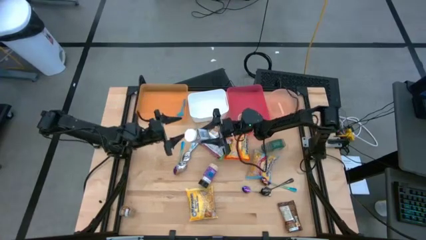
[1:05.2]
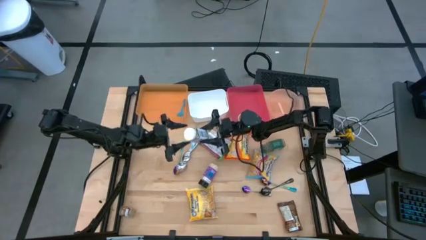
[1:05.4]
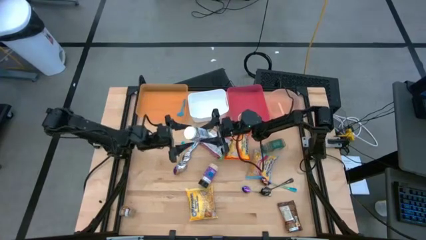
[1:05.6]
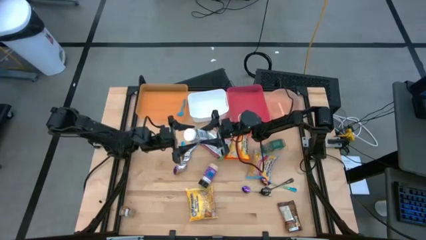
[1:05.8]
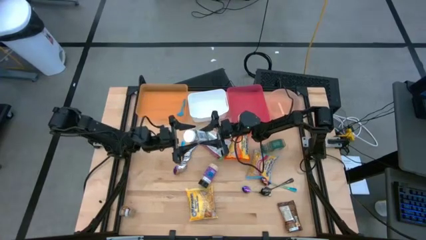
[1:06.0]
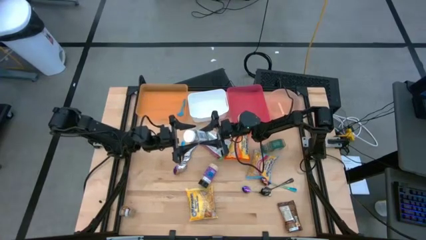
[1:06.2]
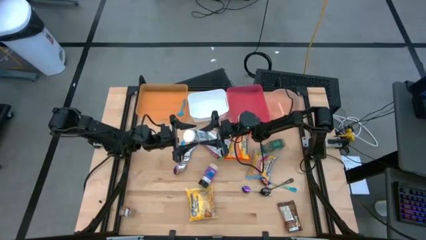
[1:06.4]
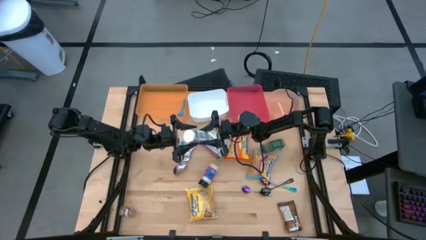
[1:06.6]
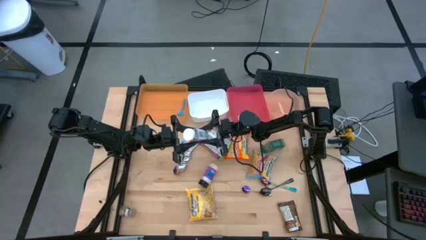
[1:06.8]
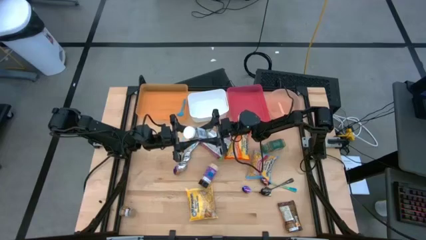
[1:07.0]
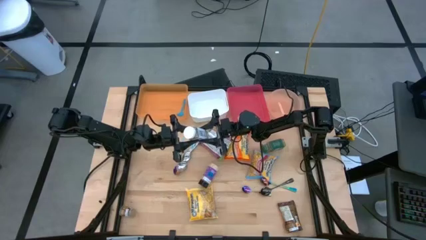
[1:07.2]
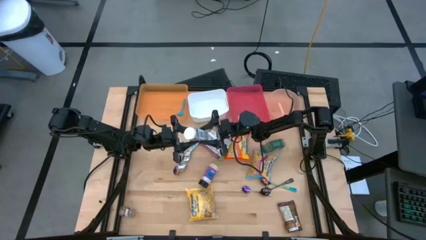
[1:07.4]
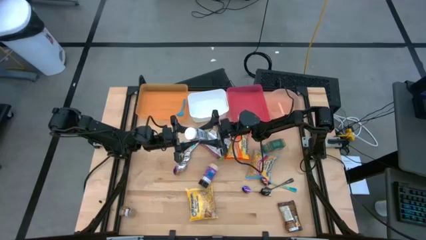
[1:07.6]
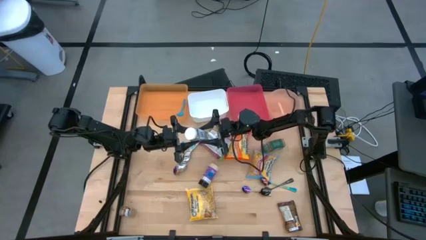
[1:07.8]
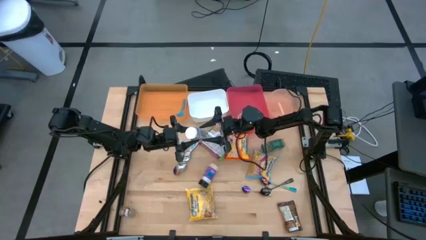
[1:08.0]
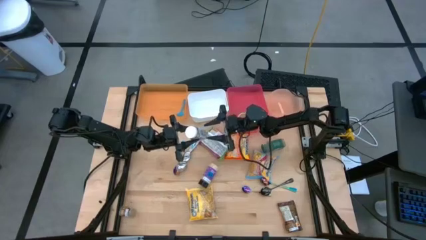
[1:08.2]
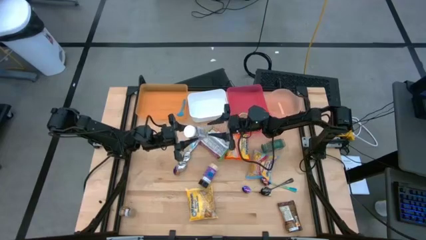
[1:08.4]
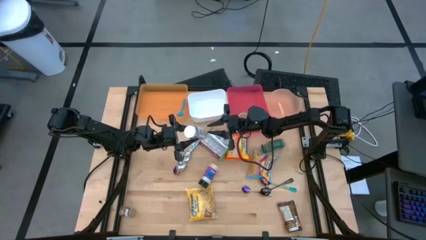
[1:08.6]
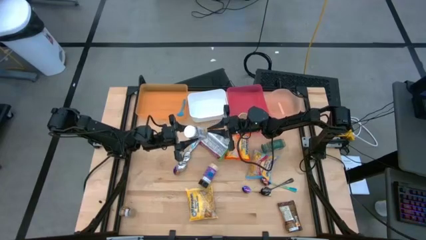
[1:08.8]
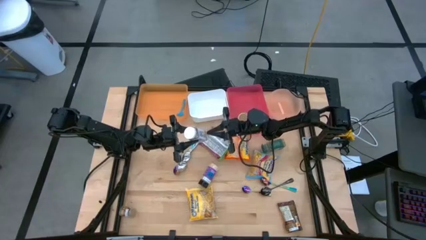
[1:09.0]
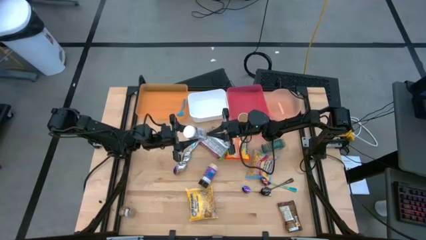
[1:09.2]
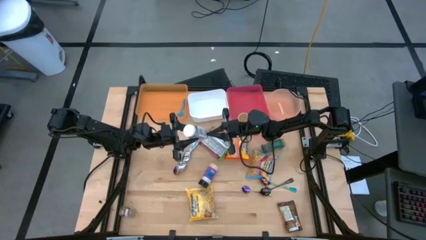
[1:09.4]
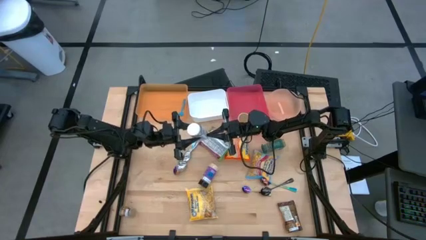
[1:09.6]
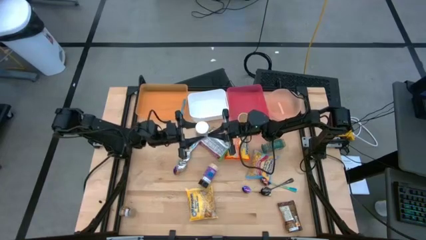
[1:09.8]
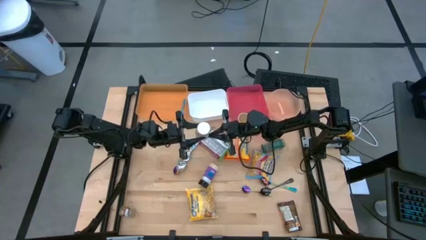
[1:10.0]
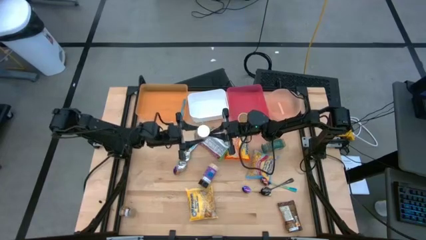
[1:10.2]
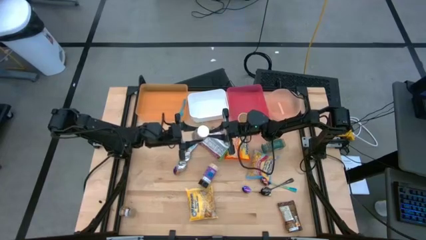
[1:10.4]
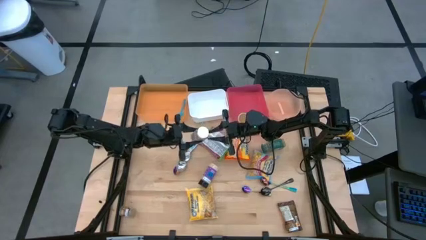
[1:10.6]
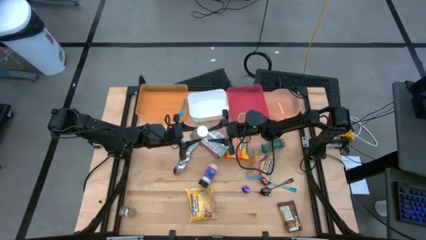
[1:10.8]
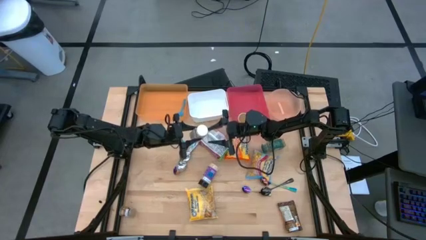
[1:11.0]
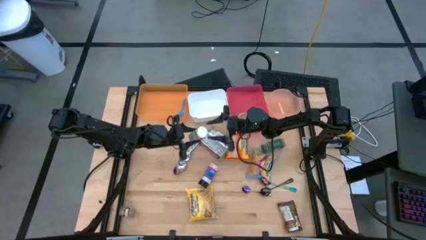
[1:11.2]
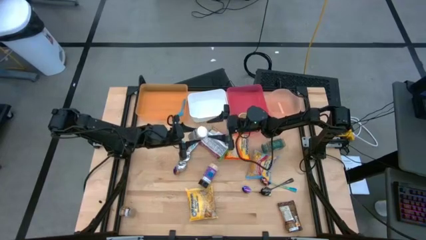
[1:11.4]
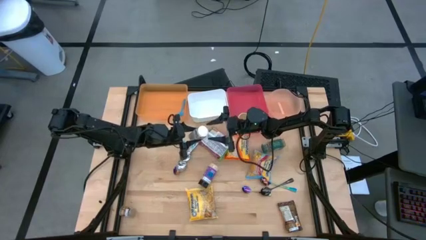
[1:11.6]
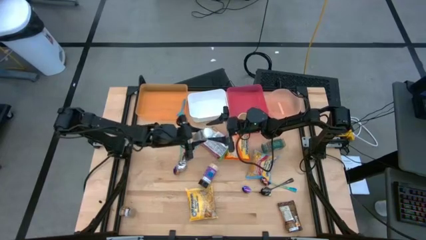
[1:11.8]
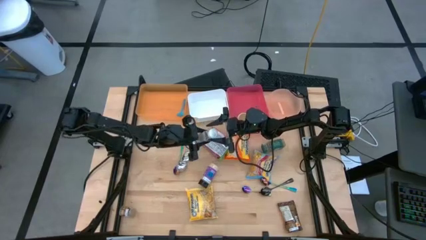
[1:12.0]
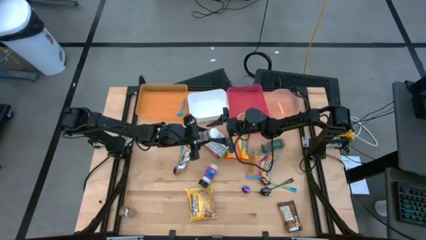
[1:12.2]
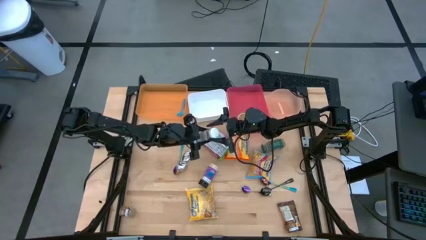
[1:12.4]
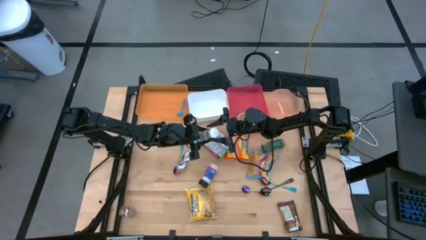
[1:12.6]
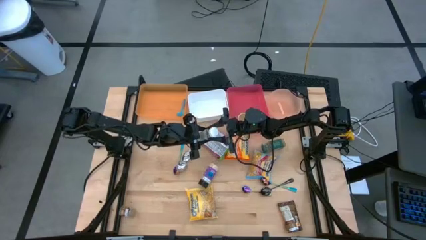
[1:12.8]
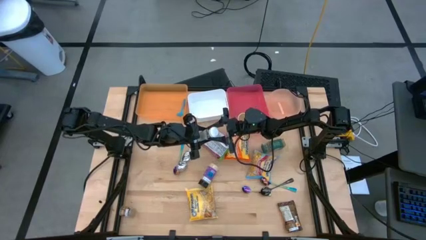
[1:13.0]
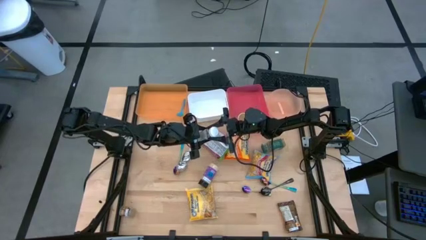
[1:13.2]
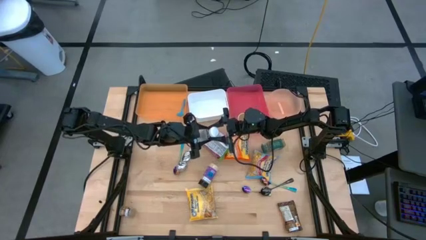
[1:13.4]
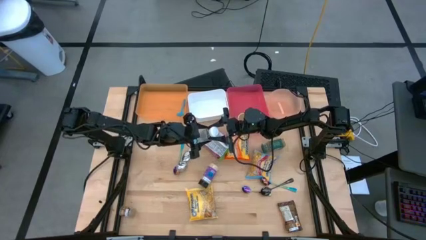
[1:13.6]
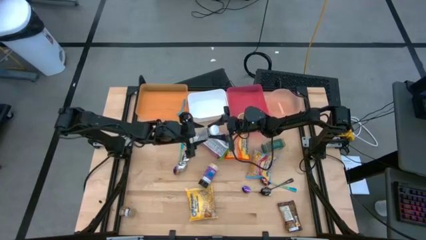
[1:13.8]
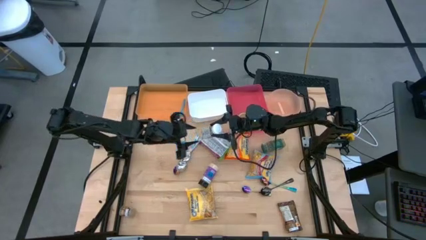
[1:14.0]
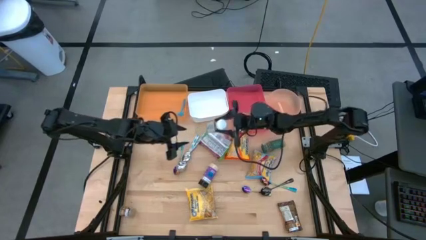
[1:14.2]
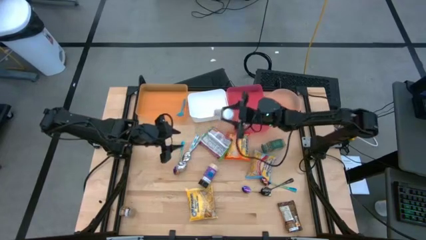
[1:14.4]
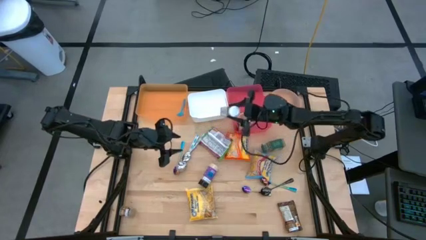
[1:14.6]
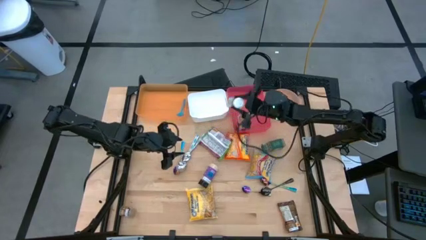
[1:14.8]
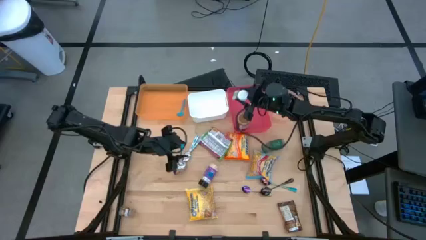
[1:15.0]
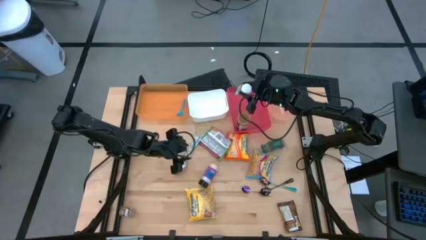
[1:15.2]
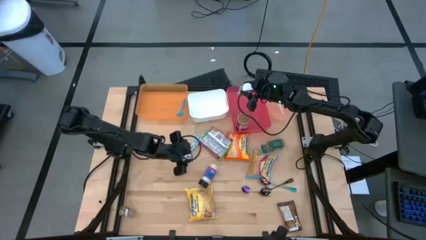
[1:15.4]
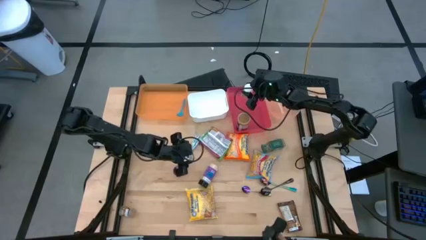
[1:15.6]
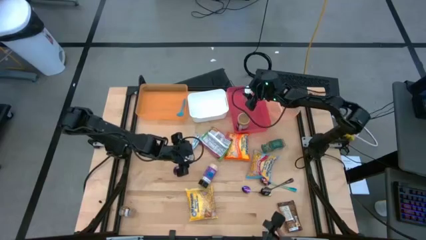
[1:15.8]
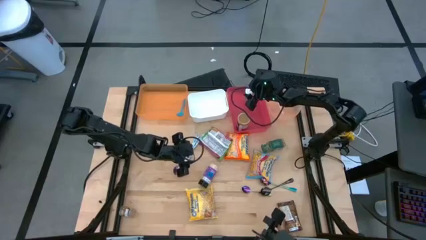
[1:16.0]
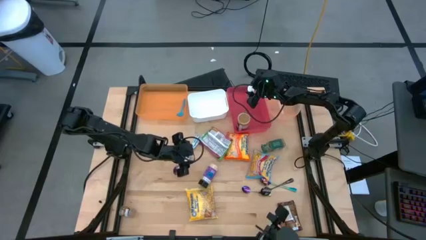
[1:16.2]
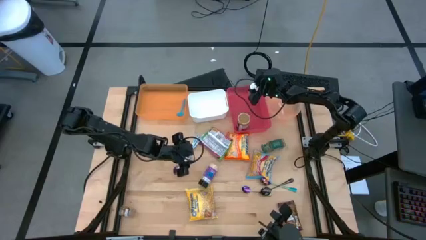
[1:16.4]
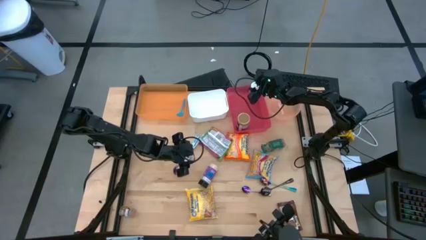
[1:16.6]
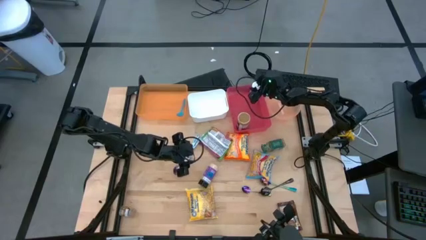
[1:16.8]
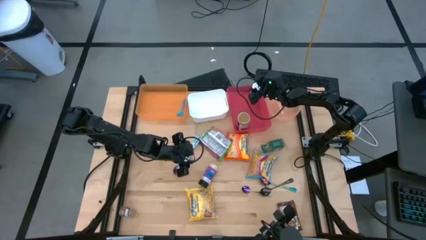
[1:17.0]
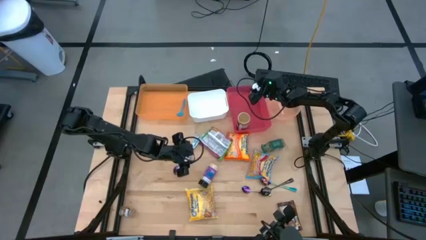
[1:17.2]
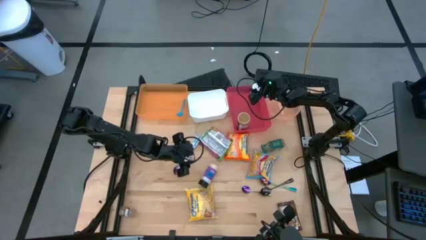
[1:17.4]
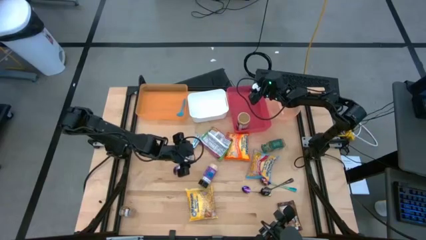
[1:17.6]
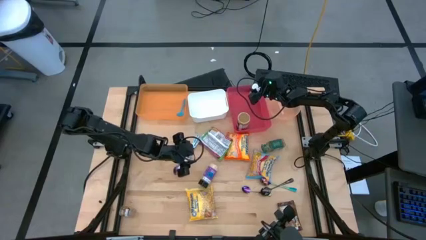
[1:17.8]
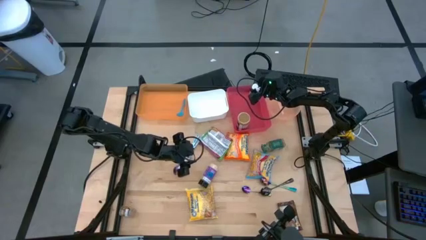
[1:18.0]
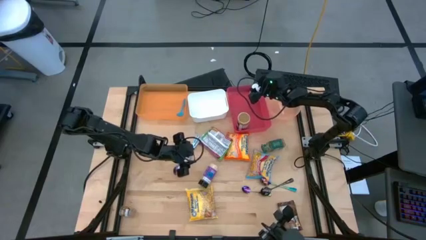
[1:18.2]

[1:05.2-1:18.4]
Task: Pick & Place Food Item
Put the white seasoning bottle into the pink bin
